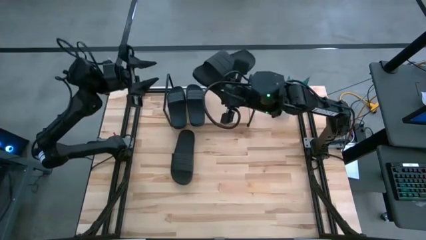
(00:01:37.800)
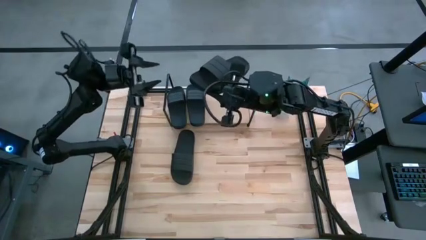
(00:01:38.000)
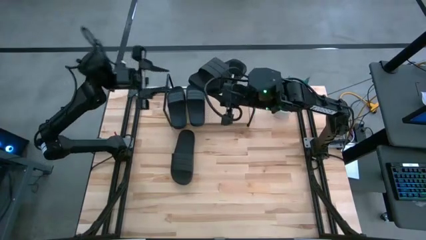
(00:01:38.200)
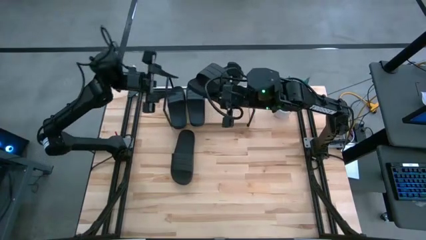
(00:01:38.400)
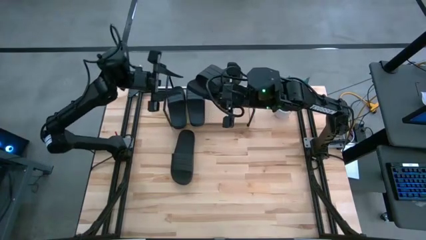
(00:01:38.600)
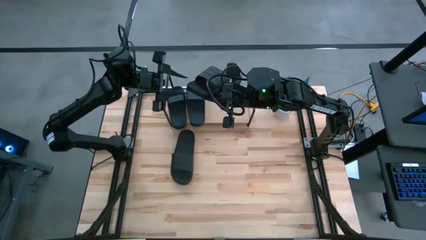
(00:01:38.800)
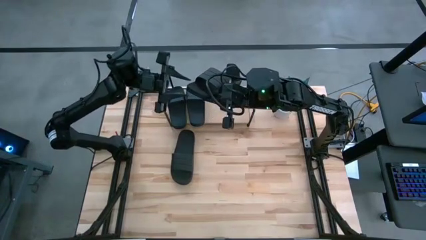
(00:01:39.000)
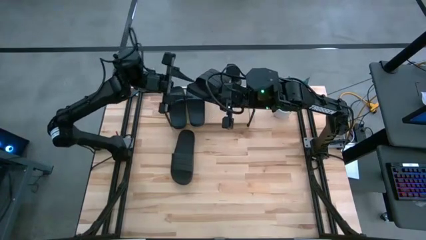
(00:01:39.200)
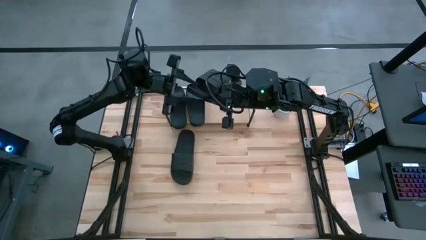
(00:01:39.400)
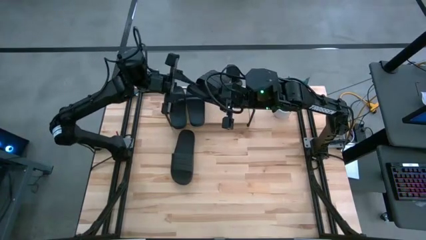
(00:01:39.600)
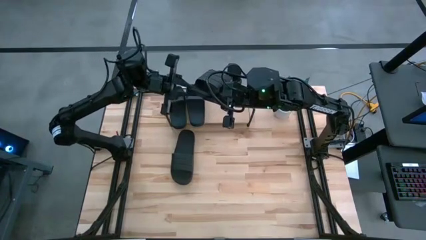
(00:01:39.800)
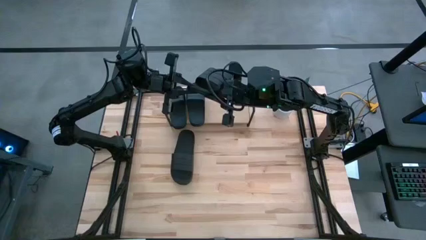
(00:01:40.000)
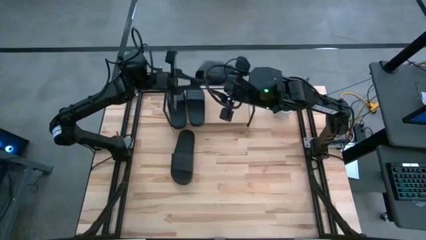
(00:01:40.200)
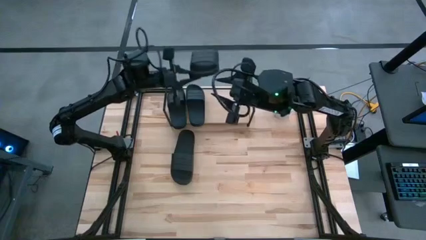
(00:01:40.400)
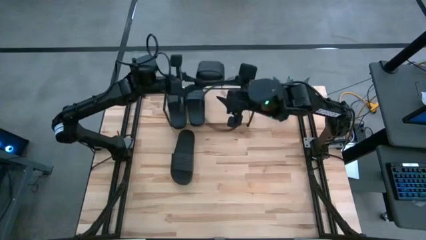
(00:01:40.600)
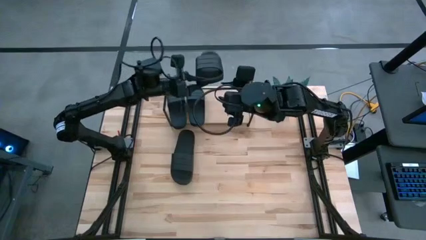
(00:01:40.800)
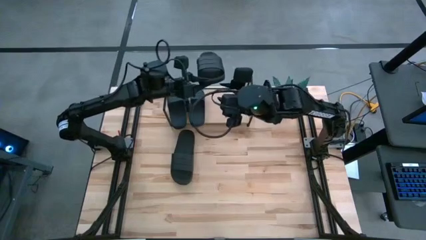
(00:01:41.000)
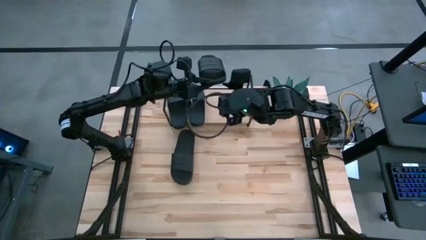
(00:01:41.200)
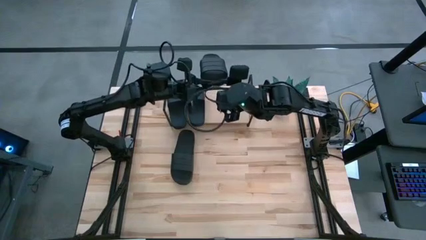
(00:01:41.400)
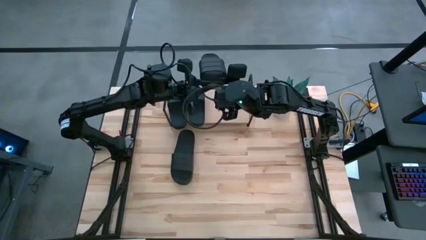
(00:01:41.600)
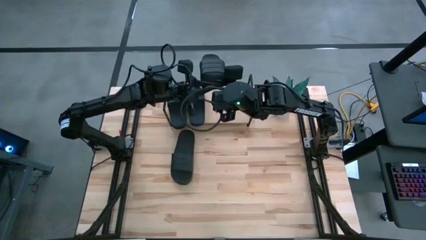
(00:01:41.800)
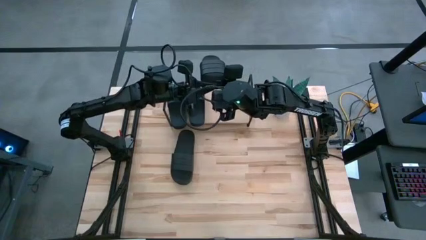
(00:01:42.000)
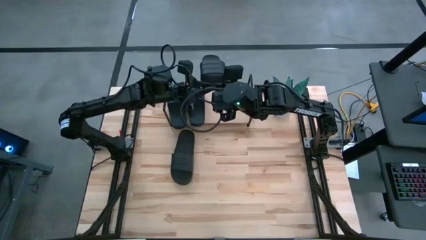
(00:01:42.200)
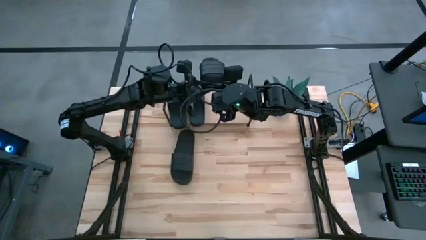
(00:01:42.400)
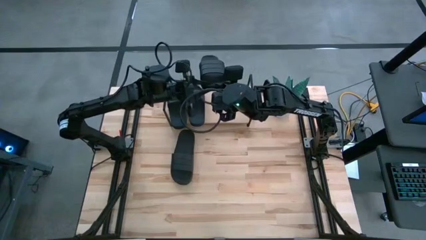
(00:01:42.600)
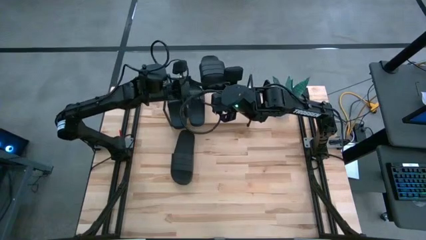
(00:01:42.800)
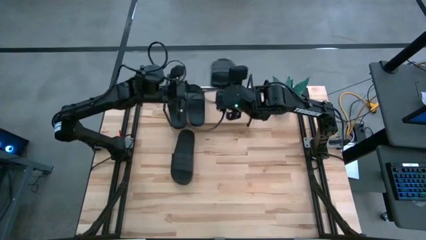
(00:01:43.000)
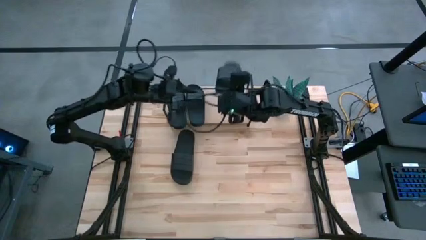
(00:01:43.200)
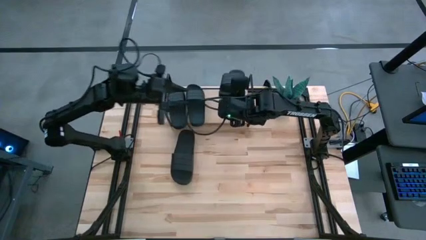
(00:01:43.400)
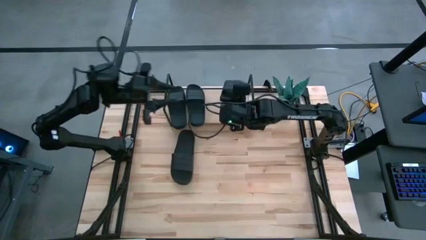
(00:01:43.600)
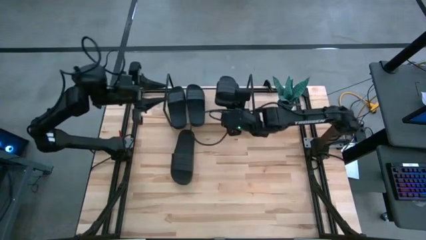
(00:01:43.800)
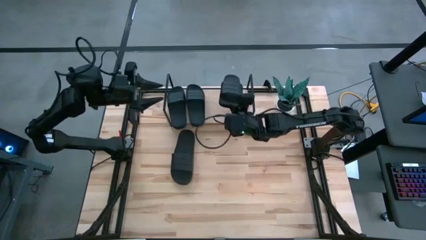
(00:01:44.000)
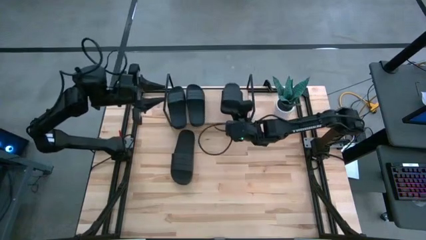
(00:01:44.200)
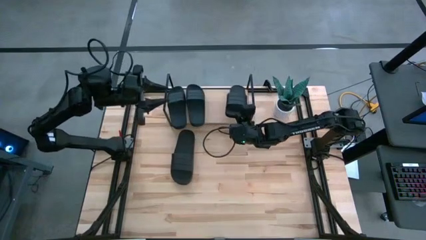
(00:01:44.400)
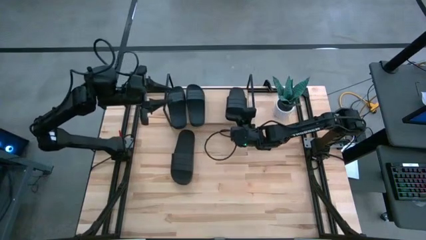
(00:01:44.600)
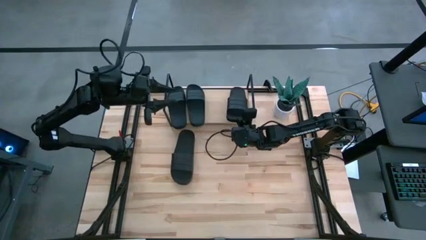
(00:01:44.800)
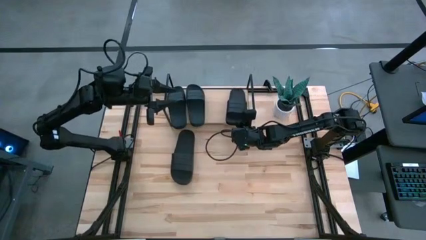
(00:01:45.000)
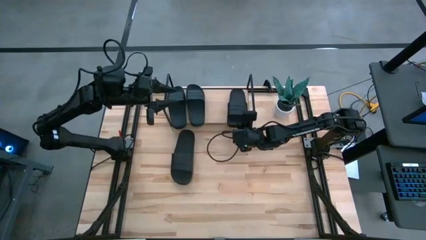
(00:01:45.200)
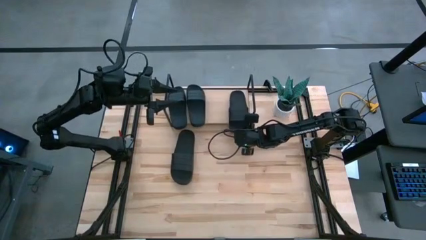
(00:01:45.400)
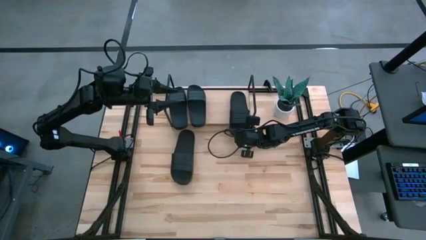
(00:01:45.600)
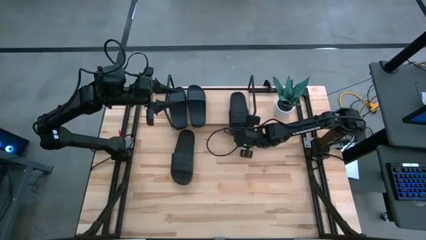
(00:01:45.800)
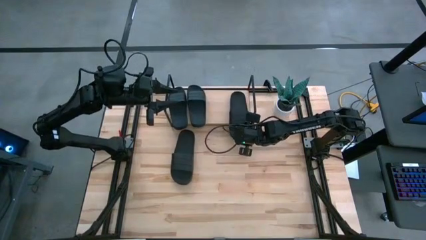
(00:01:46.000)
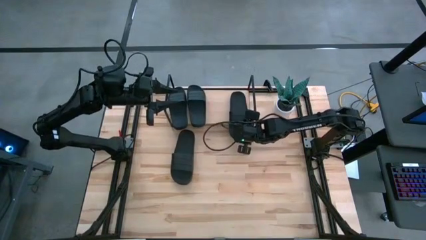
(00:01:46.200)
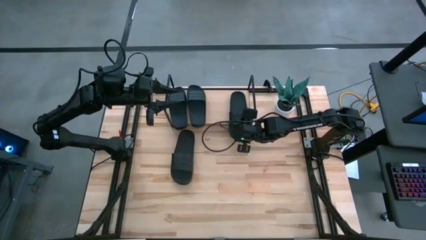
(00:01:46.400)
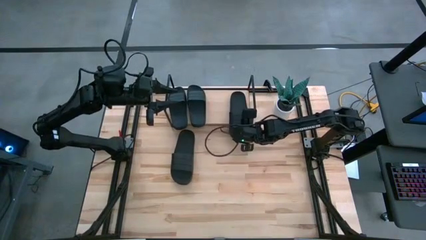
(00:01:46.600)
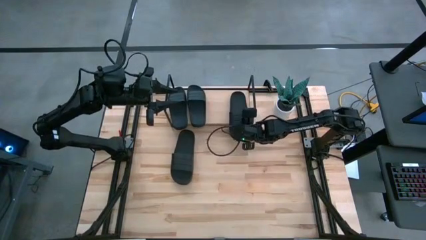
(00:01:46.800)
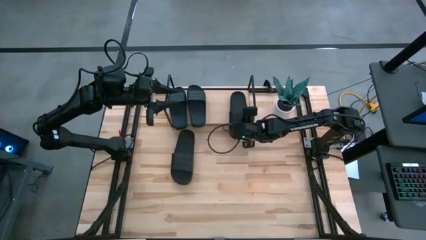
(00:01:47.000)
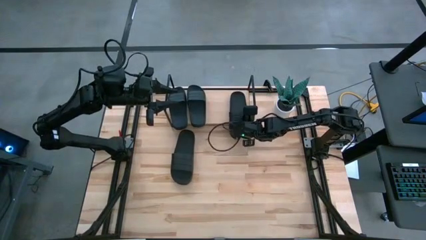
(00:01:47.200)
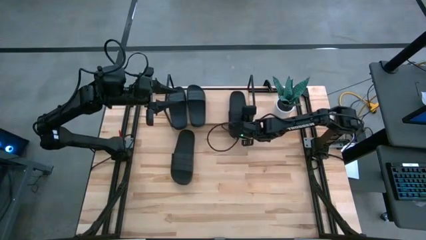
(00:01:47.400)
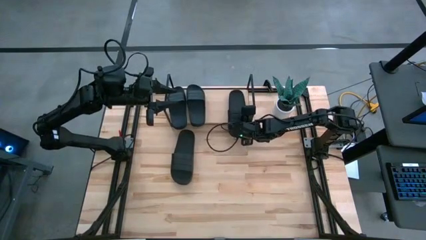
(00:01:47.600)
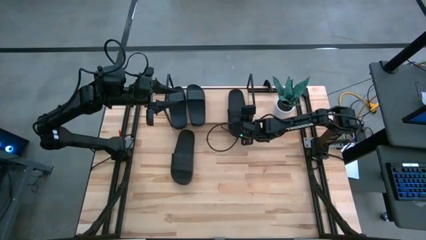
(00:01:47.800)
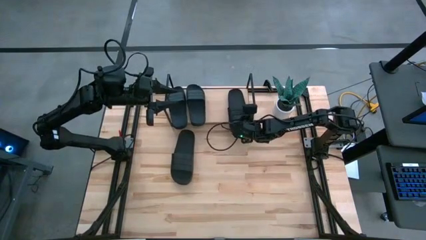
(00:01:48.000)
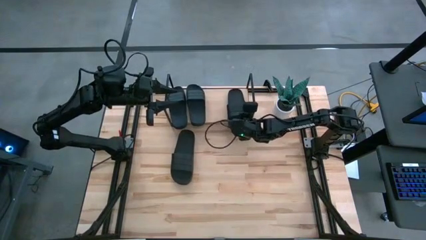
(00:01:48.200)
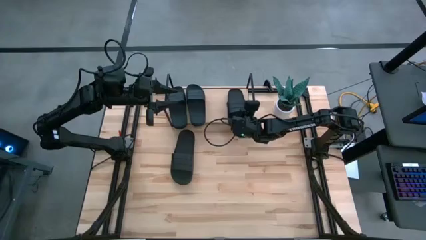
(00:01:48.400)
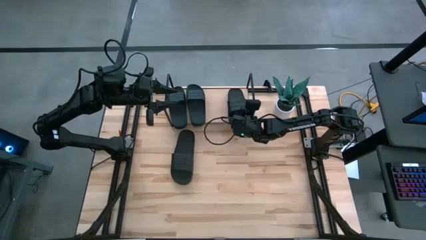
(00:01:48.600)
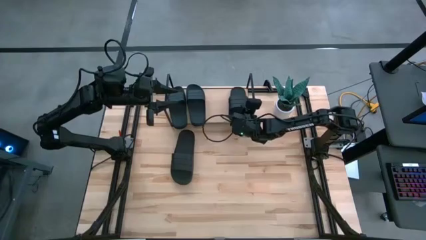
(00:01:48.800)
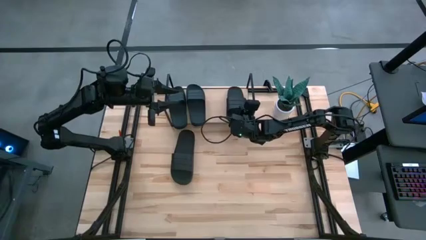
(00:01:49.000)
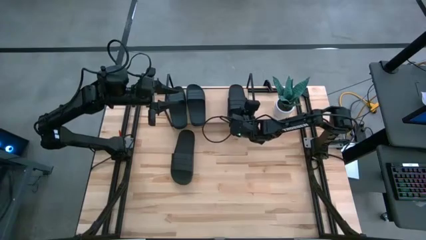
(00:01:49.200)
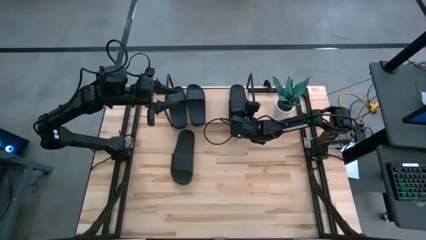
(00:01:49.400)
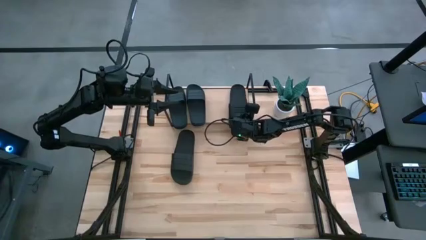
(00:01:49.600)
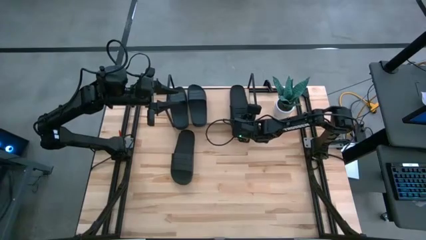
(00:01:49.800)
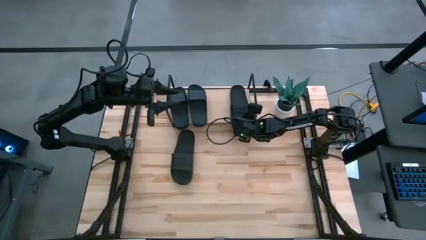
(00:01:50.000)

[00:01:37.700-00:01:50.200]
Task: Pick and place slides into the shelf
Put the right black slide on the shelf

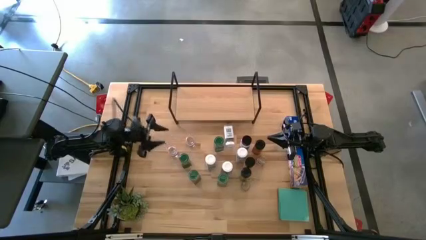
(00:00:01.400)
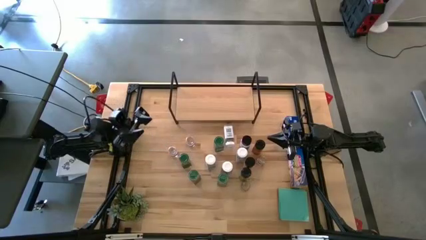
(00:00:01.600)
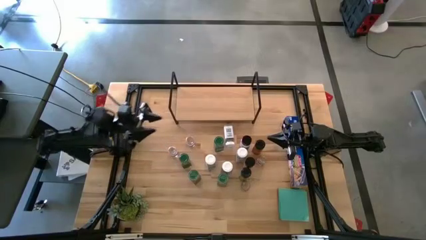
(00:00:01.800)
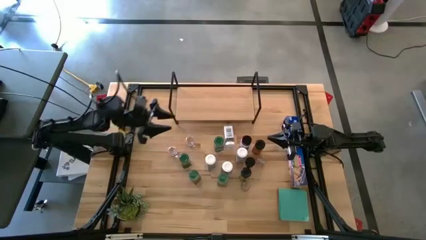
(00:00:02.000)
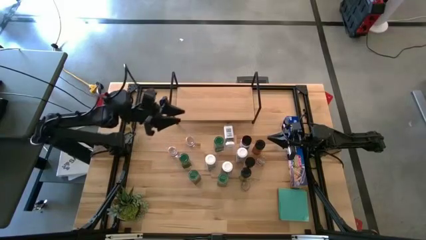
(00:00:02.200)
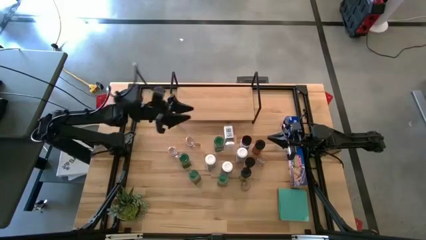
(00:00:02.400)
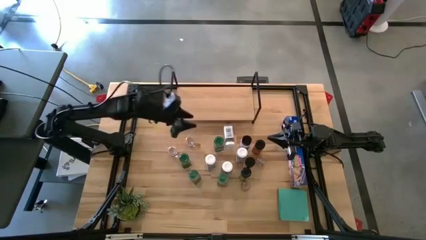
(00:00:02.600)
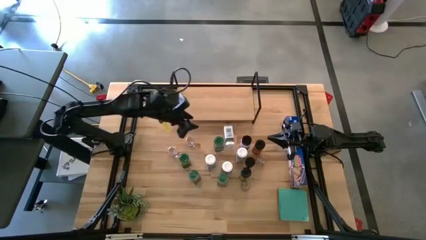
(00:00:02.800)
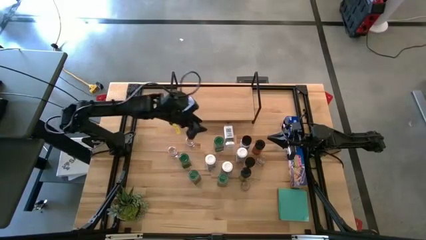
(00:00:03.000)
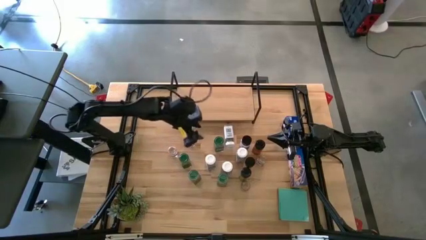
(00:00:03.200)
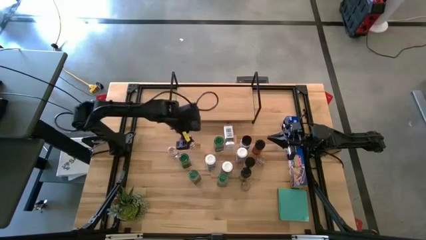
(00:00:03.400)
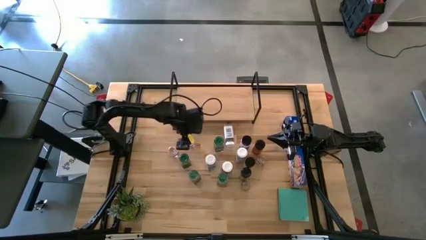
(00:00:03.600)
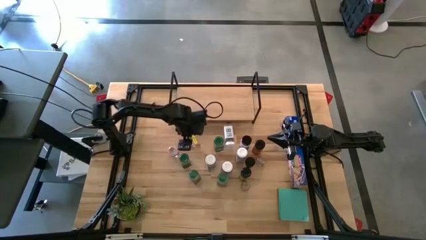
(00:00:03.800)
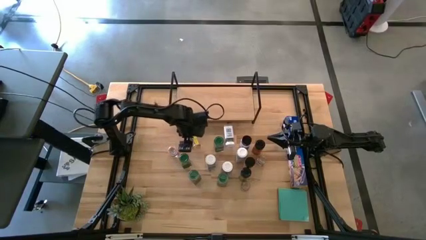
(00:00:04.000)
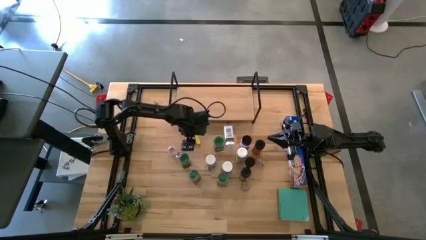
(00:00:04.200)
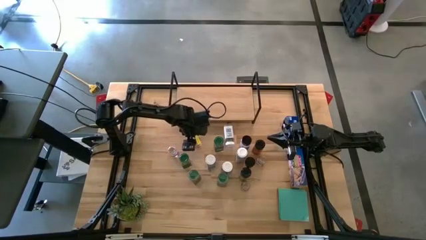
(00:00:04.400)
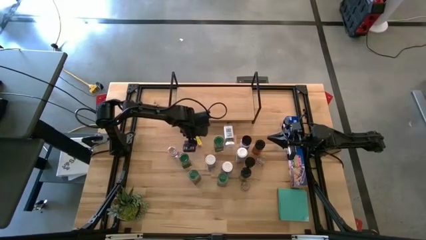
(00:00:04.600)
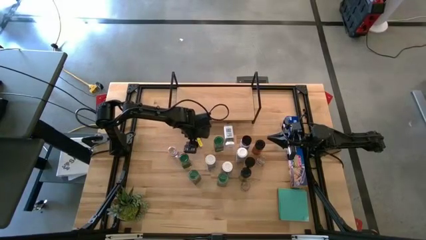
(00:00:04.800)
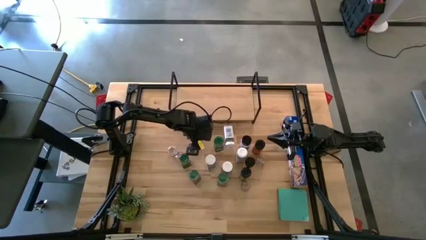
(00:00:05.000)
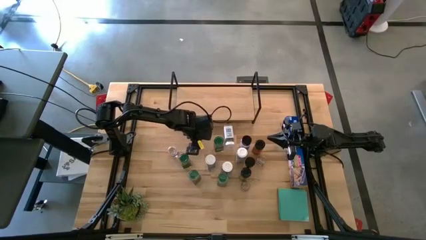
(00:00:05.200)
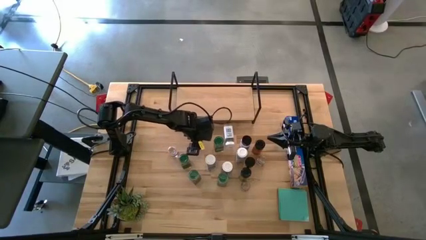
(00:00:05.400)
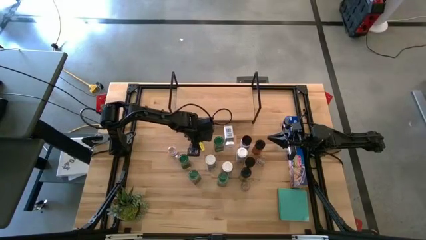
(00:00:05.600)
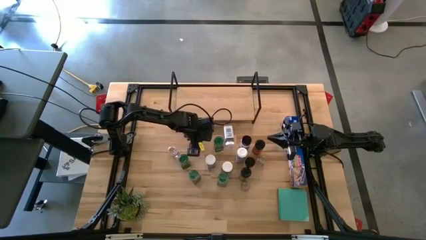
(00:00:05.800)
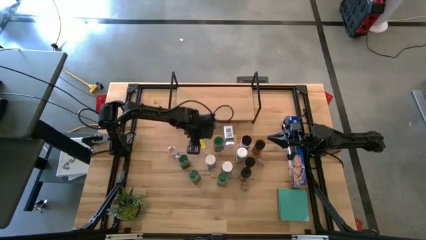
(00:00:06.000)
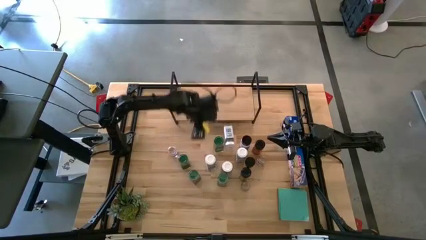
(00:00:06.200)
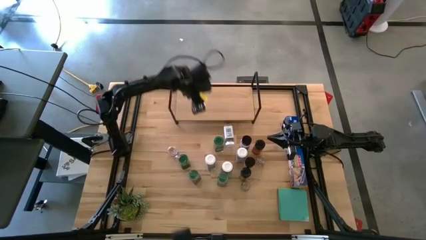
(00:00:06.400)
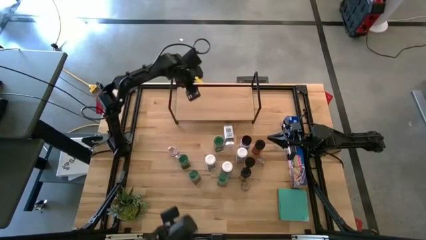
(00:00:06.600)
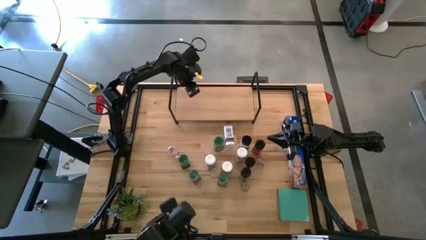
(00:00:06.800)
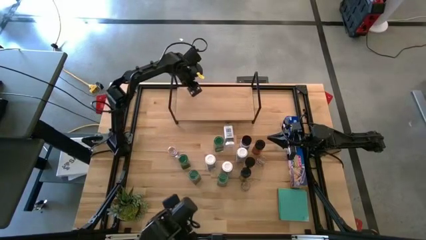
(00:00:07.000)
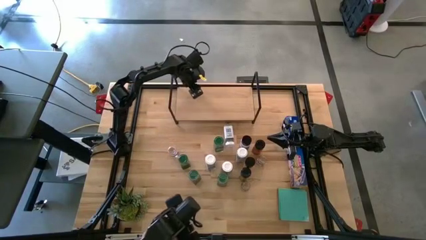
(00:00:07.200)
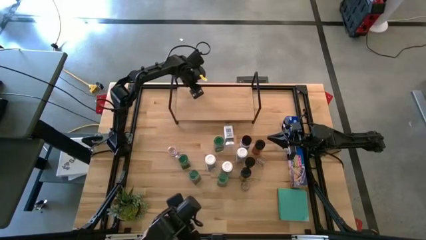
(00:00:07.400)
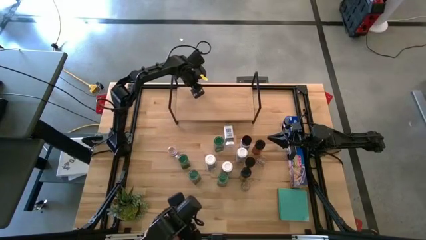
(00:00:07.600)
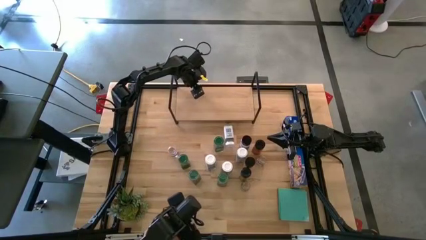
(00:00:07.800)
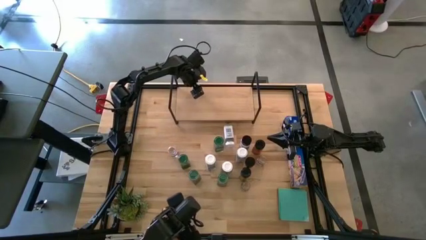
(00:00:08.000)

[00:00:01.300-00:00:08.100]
Task: Shelf spices
Put the top brown seasoning bottle on the shelf
